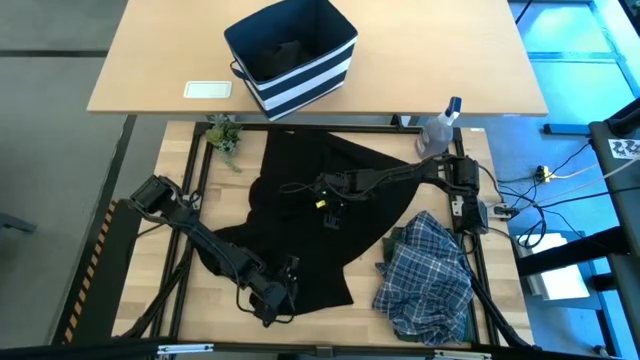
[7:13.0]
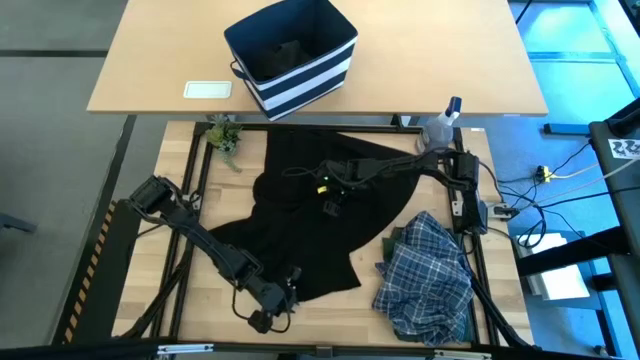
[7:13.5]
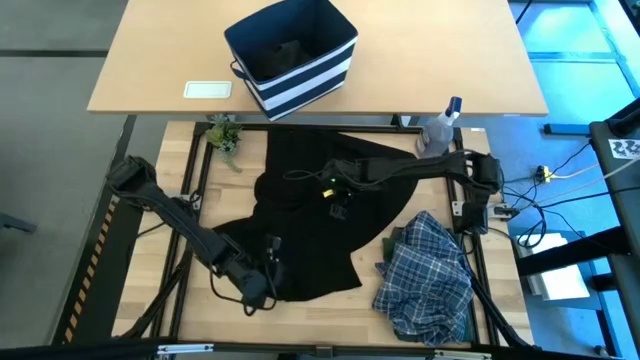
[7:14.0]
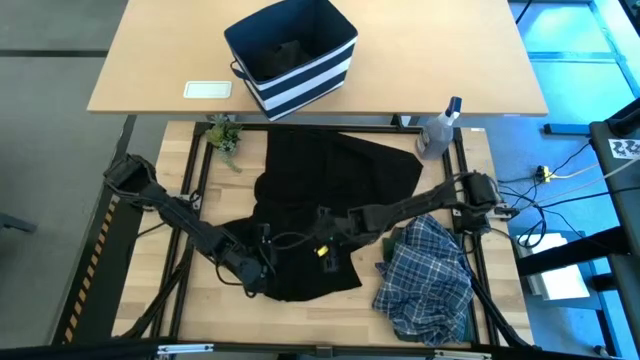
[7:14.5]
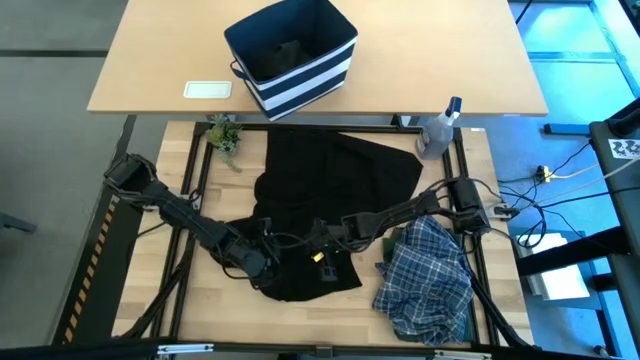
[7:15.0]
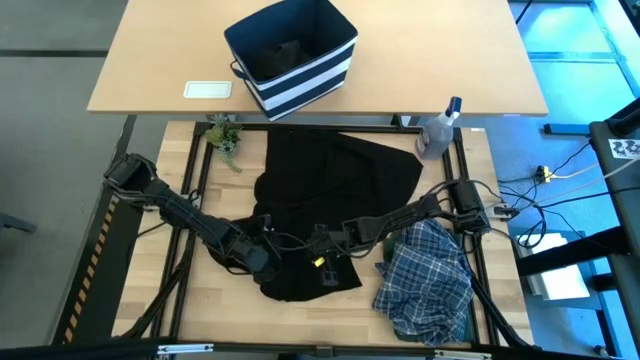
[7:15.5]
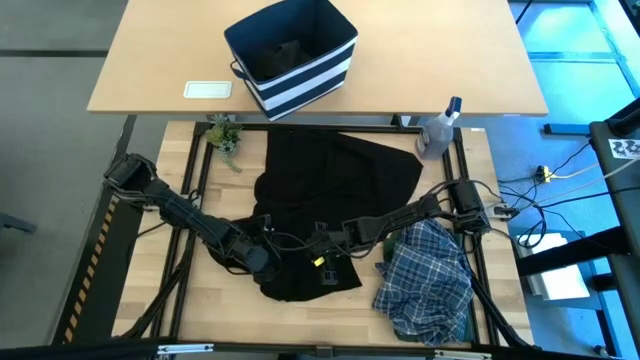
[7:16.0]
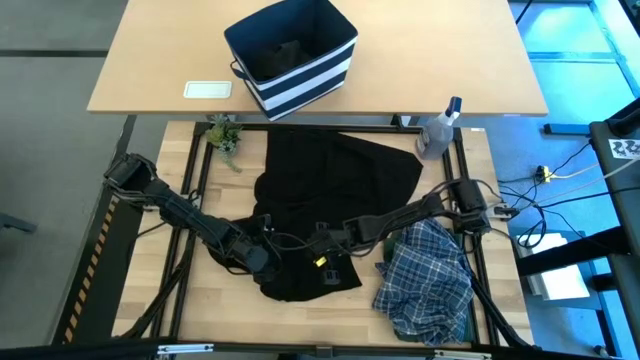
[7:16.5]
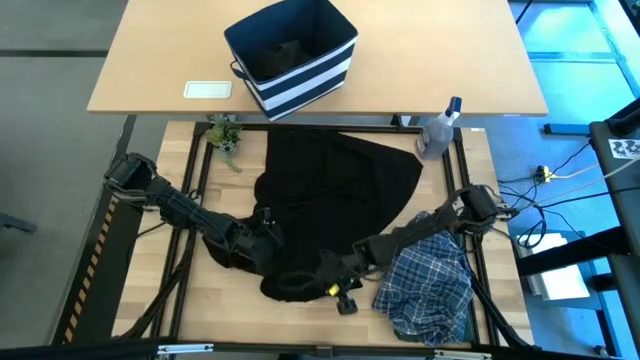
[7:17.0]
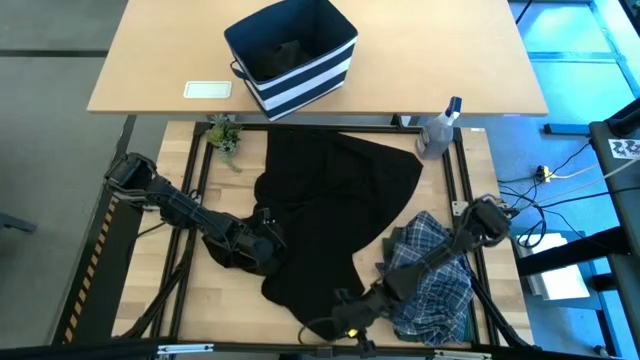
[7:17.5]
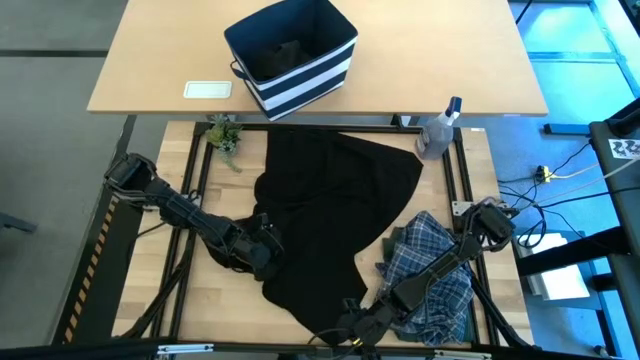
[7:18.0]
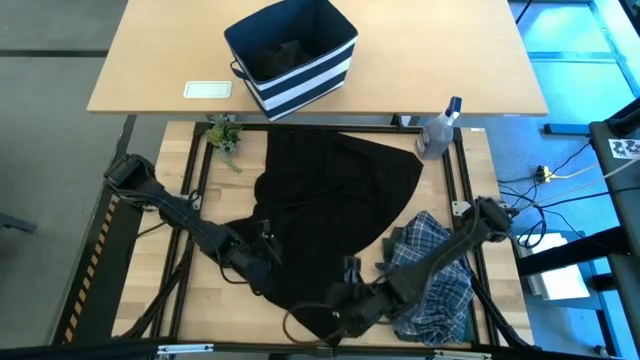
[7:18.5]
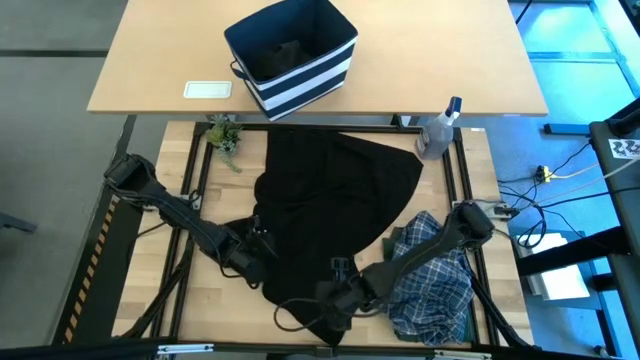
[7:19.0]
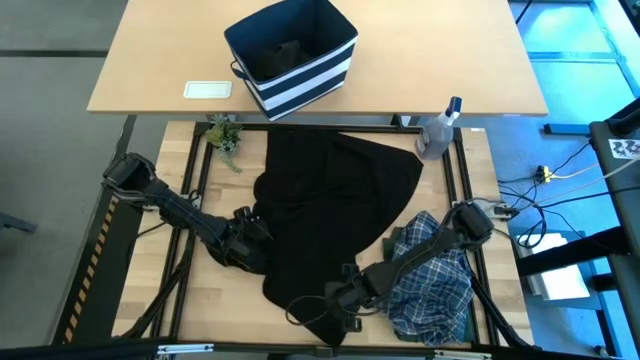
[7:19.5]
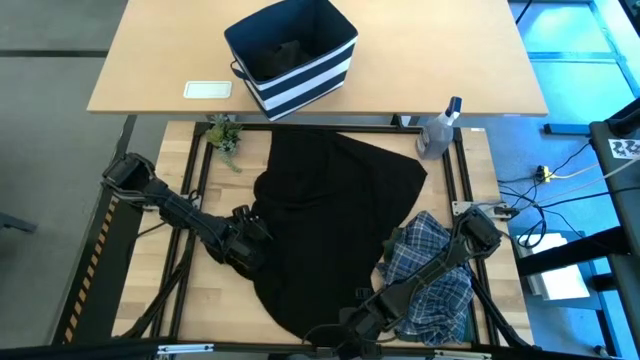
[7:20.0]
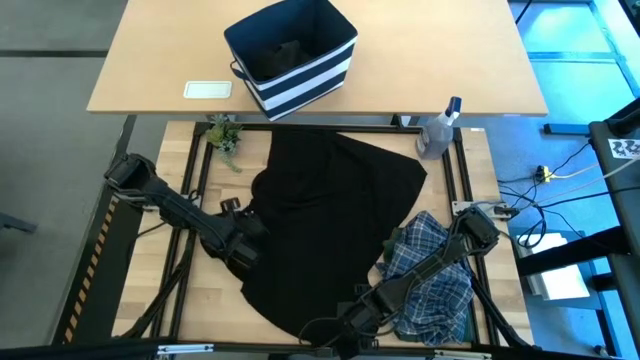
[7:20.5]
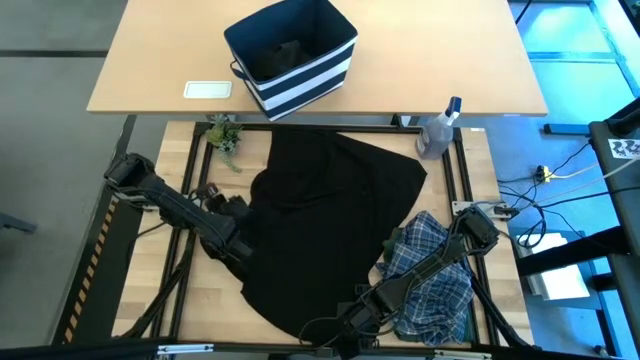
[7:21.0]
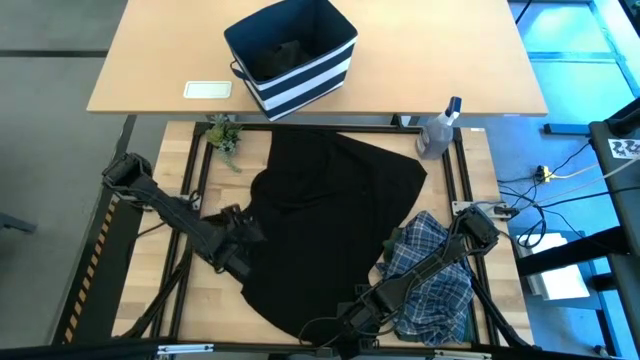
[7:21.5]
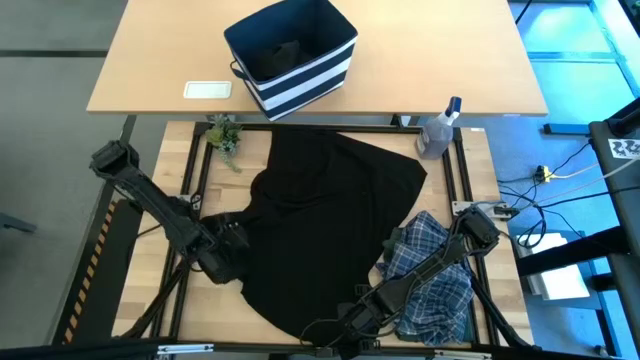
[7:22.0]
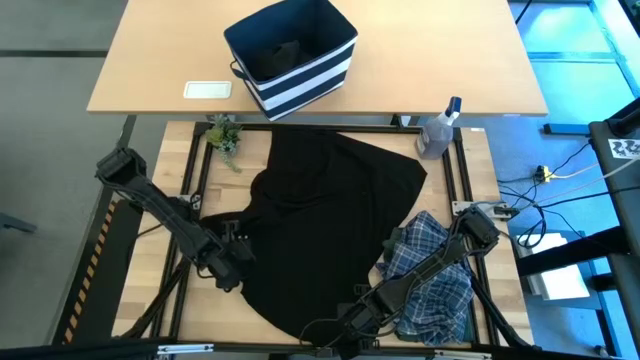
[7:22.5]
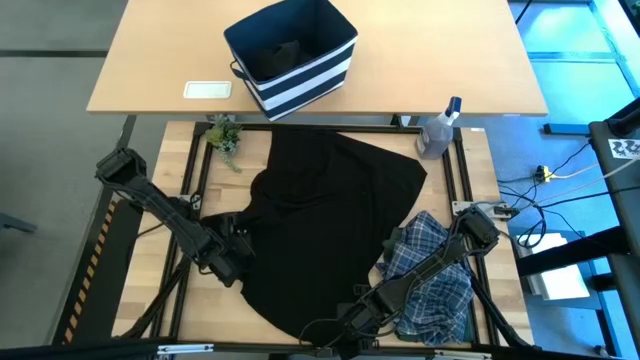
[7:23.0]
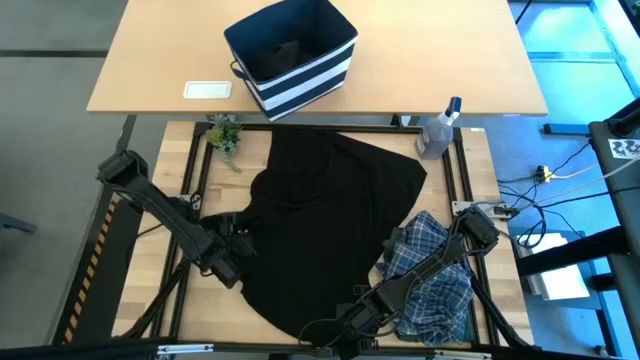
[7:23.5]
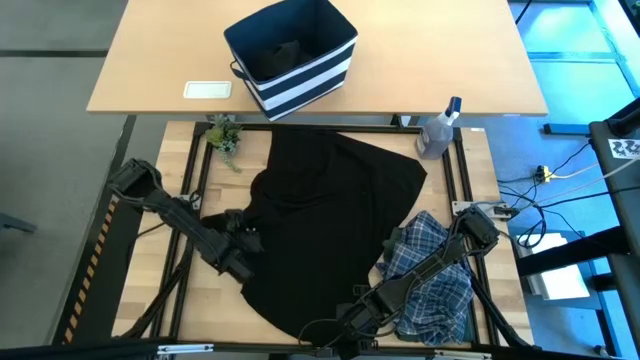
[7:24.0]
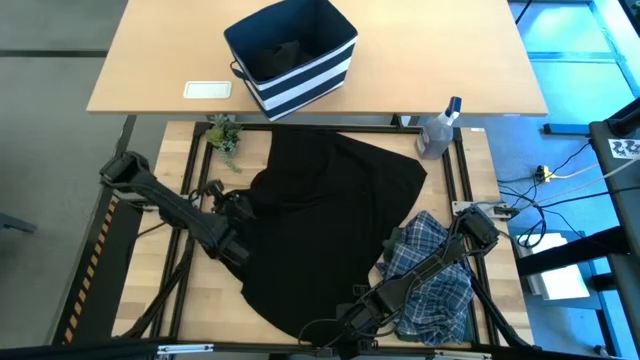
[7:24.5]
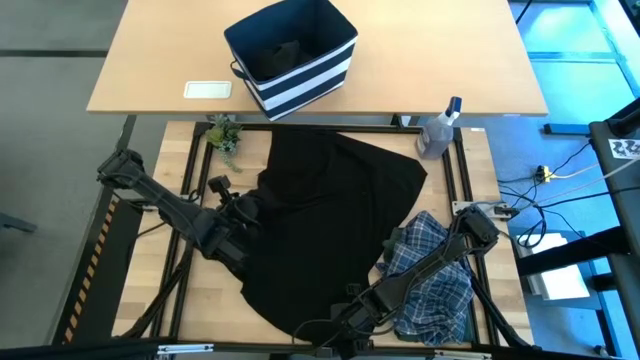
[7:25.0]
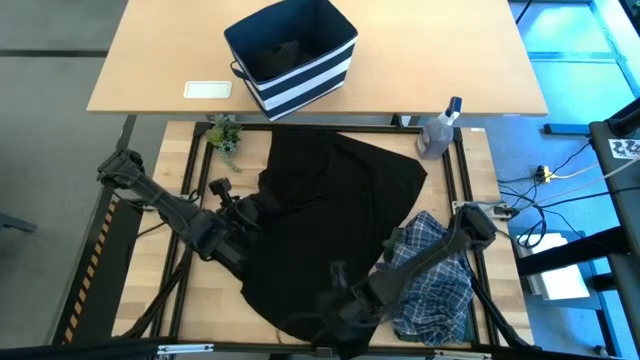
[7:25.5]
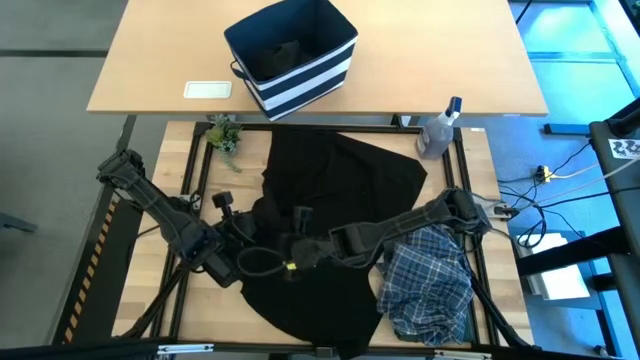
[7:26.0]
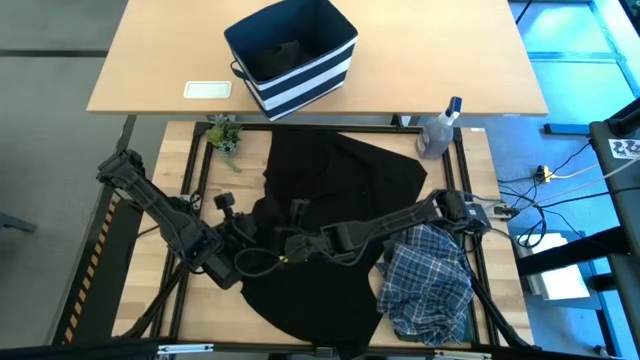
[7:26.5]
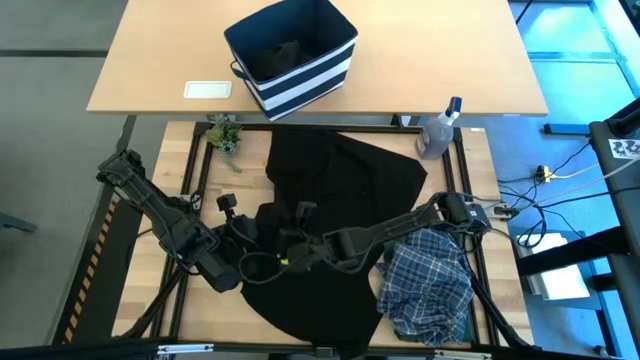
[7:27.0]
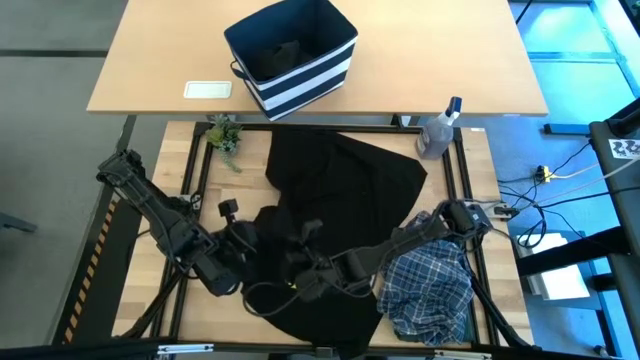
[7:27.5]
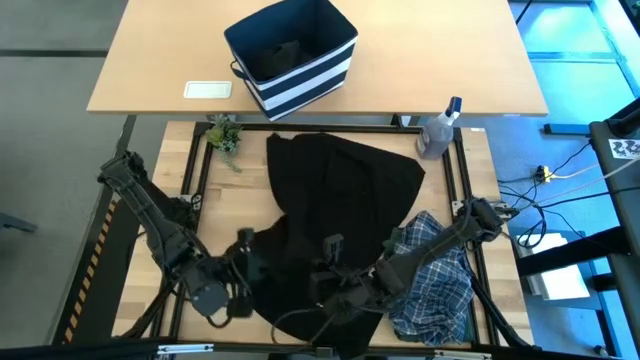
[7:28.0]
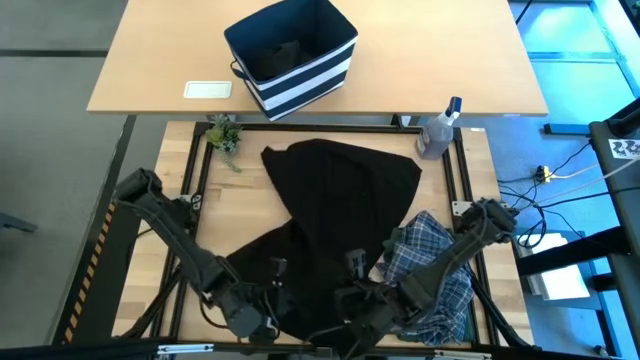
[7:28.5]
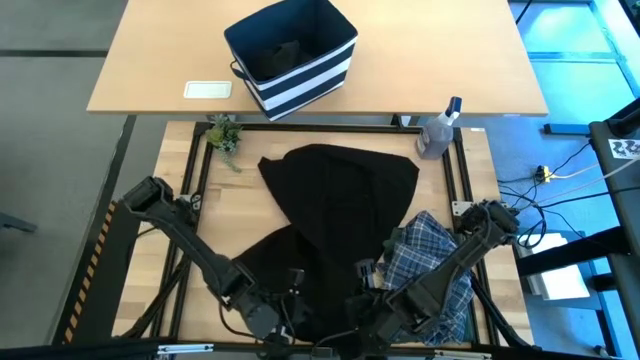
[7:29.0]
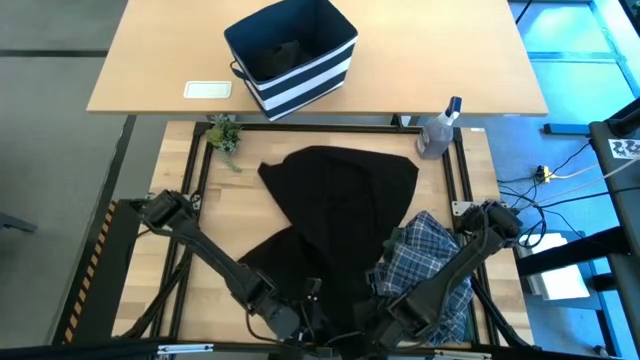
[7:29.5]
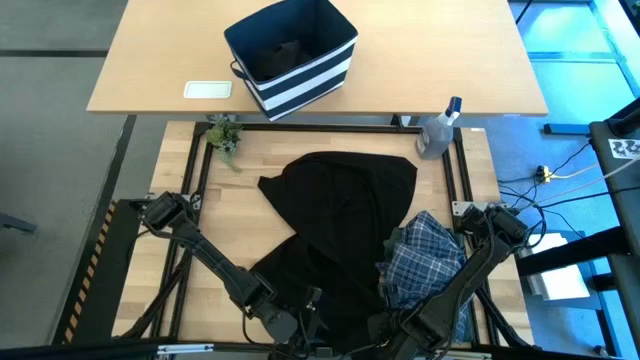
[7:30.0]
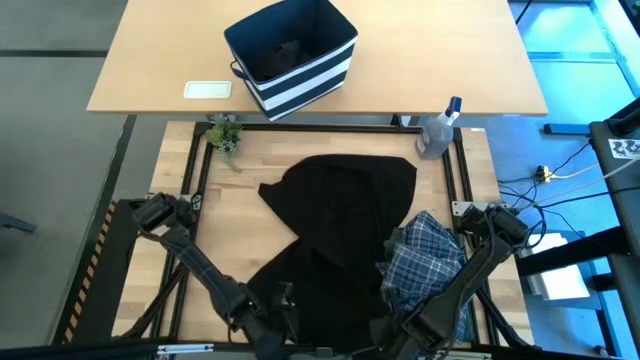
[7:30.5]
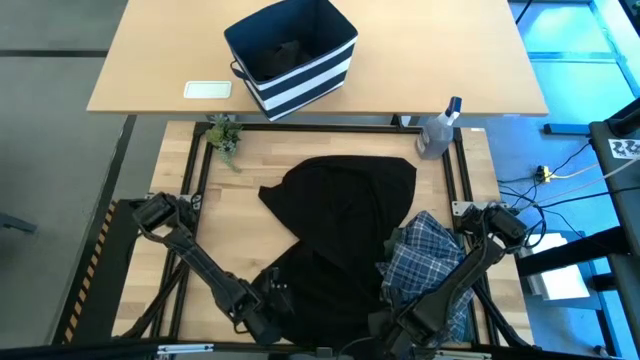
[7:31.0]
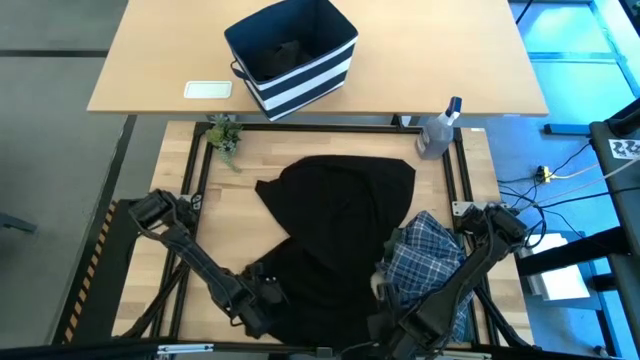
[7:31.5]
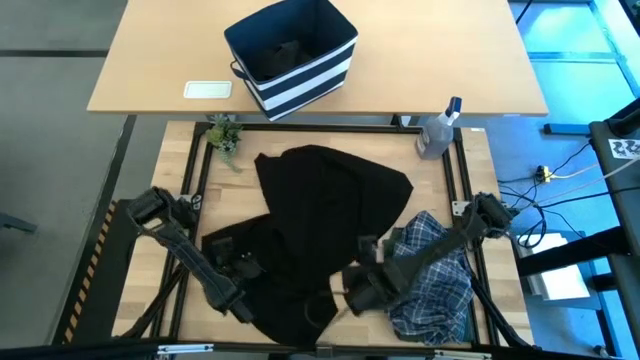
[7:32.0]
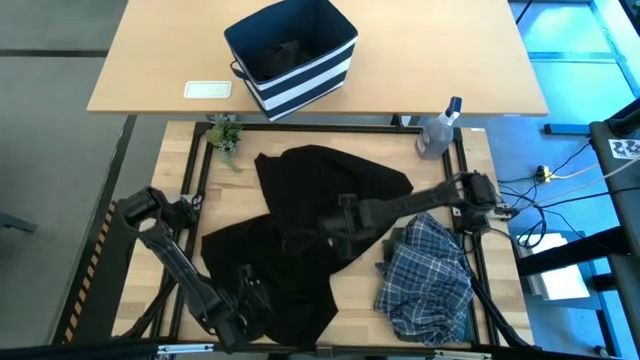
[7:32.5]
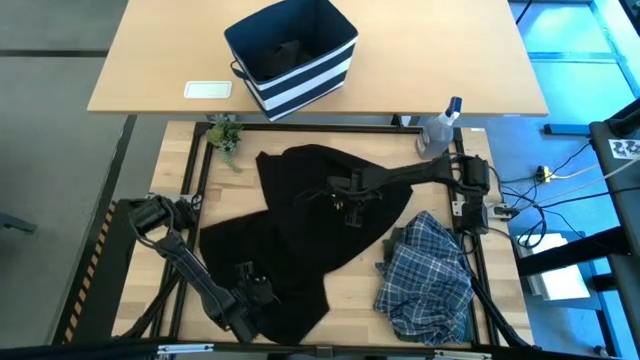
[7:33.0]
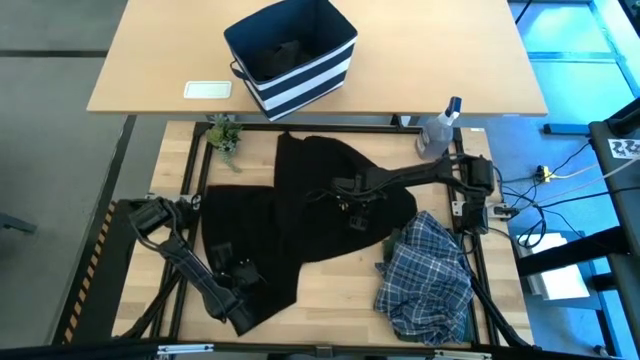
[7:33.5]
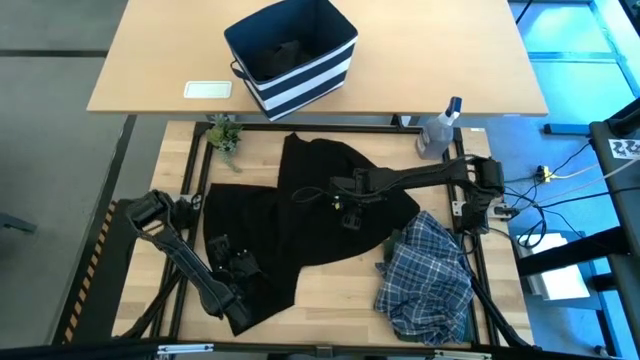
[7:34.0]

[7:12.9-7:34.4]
Task: Fold Laundry from Bin
Fold the black shirt
